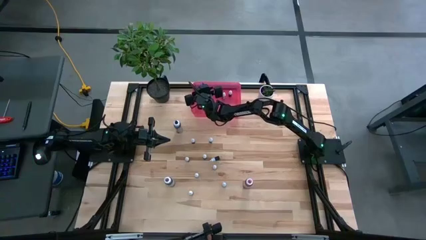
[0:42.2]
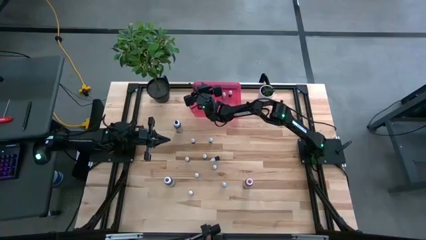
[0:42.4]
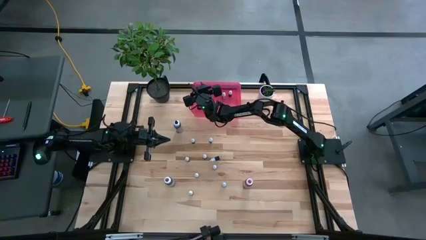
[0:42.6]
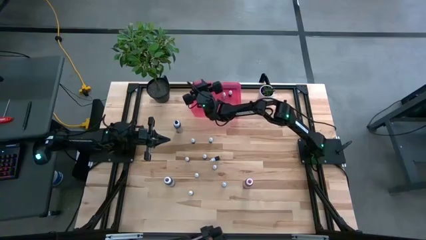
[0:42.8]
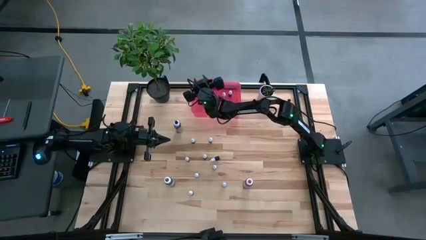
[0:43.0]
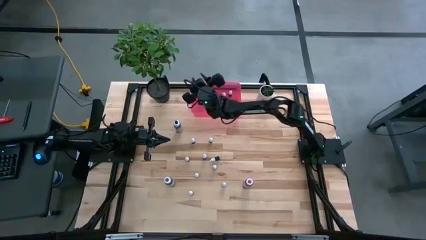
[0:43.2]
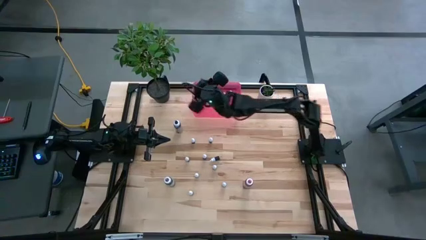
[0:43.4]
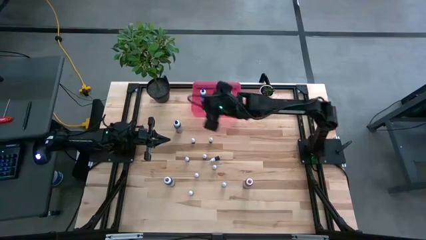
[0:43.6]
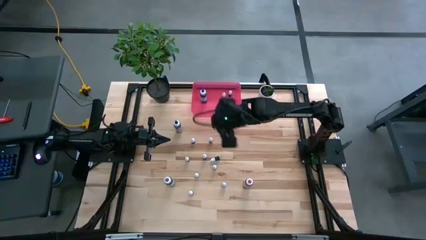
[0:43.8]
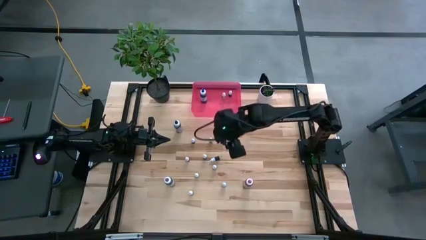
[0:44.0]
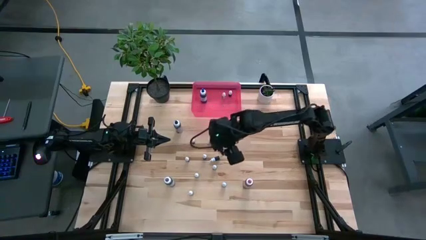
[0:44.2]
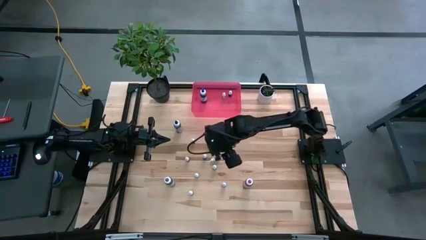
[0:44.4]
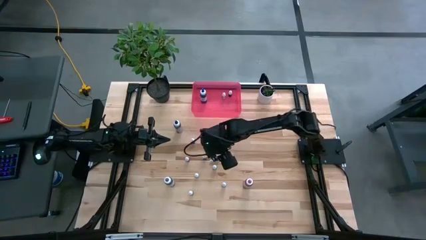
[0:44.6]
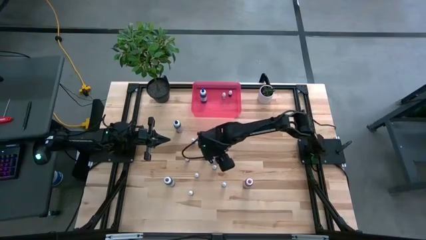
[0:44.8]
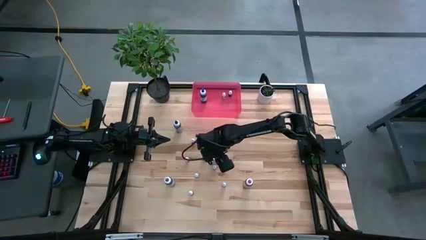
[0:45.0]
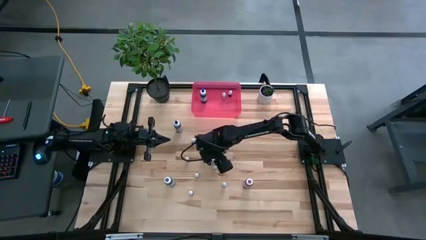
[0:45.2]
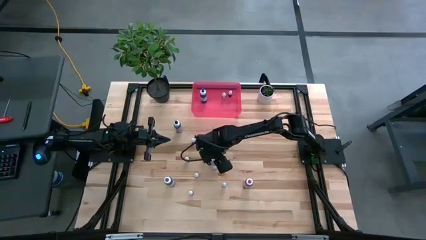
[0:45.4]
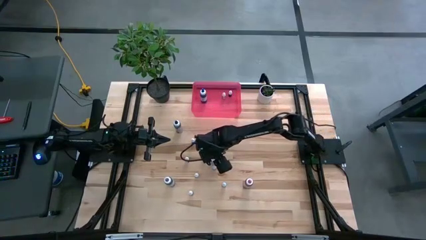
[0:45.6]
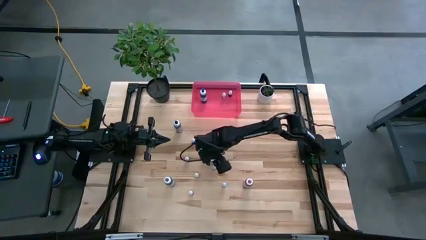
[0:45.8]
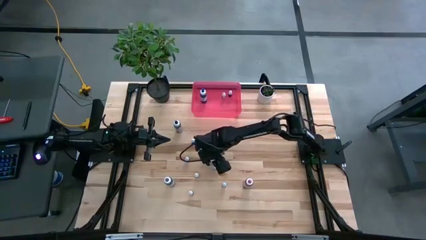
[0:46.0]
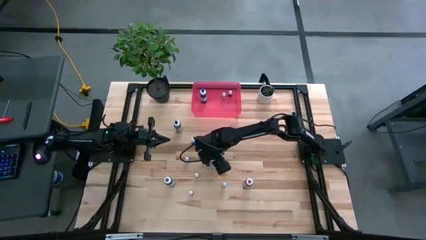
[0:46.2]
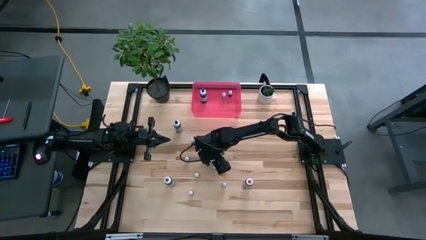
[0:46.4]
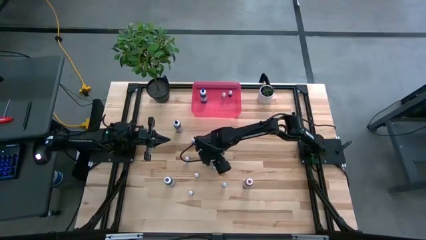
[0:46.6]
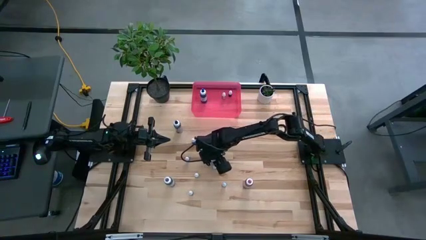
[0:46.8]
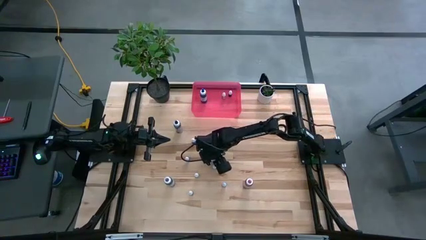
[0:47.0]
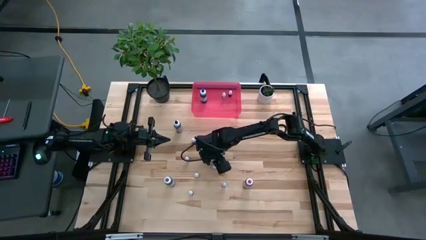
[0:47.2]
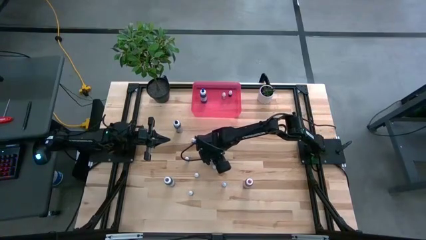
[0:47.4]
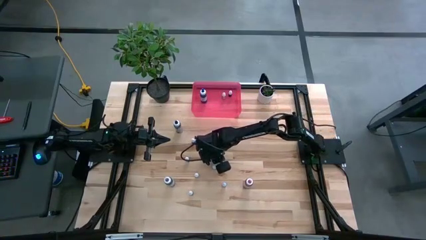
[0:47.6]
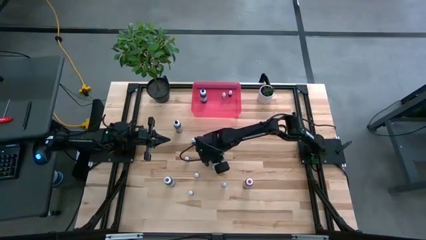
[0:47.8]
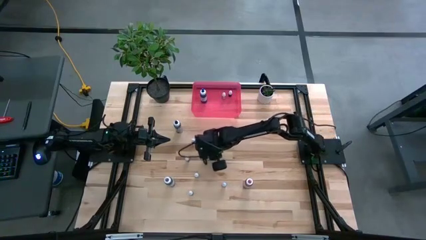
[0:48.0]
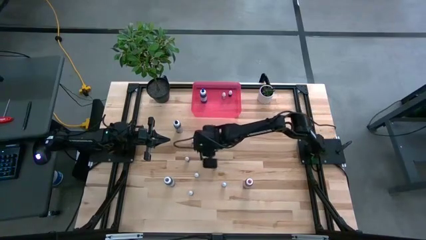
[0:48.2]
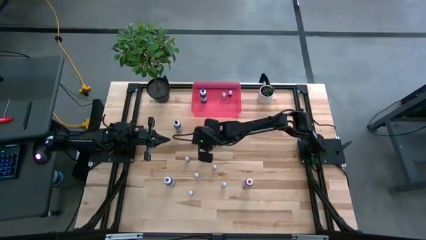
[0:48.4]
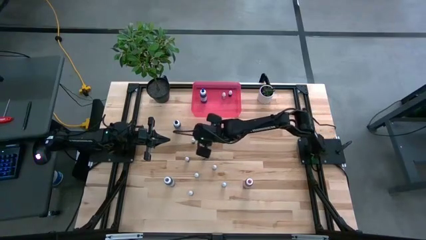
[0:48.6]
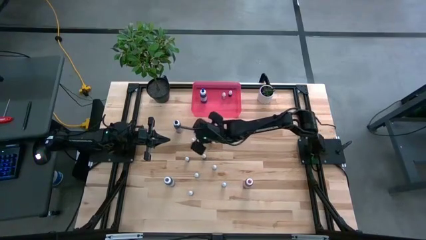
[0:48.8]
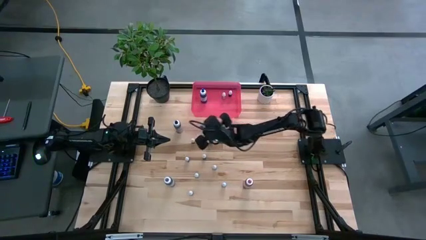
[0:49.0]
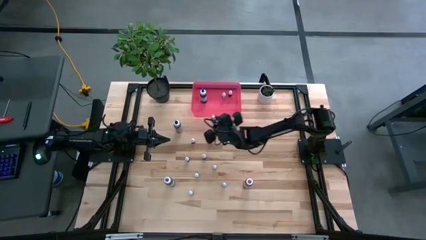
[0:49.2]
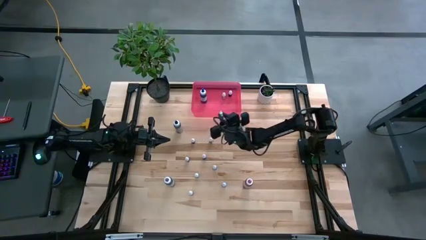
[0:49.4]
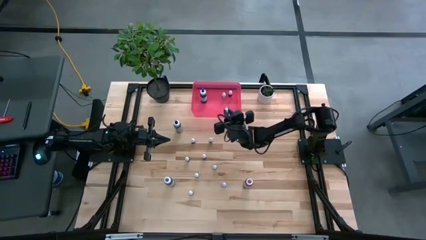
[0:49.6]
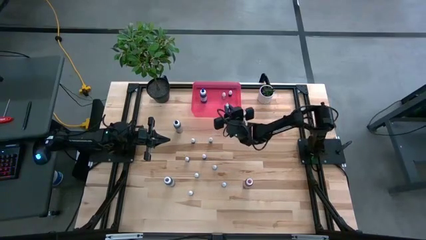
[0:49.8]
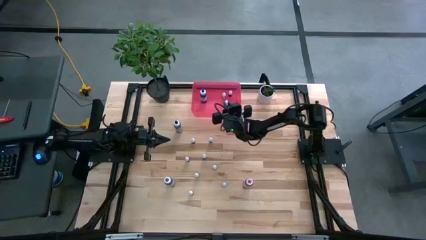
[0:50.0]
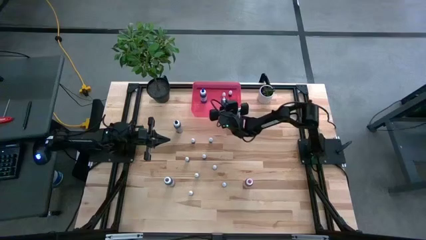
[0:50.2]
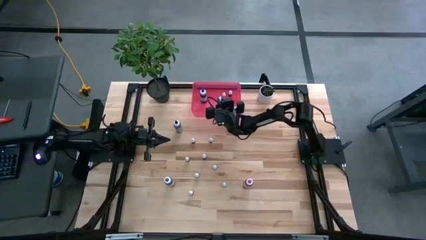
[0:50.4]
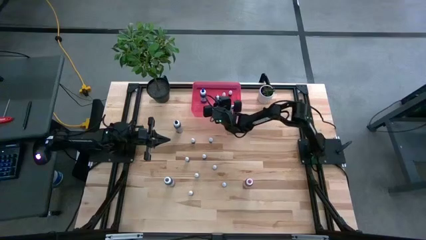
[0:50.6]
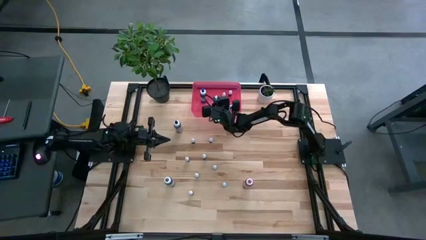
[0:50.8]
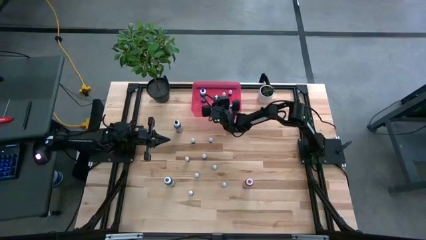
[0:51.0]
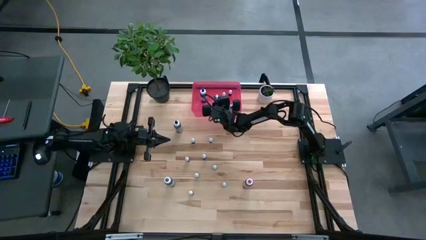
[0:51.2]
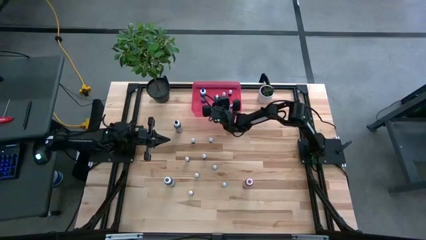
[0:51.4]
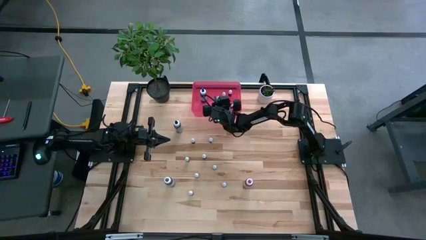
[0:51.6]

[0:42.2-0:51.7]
Task: Pick & Place food coloring
Put the small black food coloring bottle into the red bin

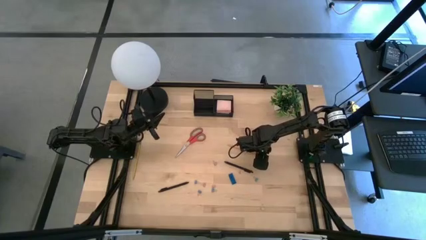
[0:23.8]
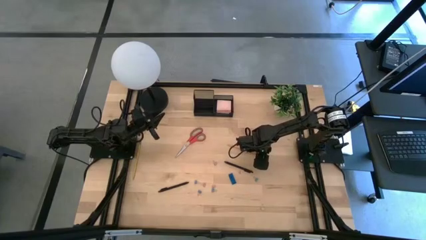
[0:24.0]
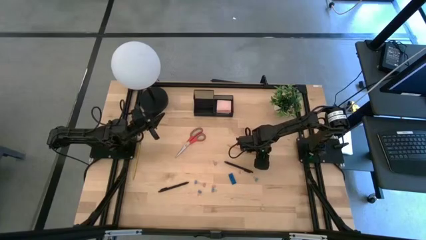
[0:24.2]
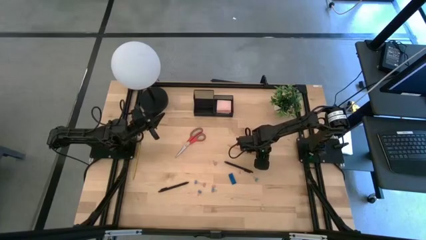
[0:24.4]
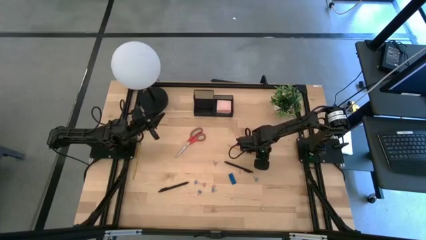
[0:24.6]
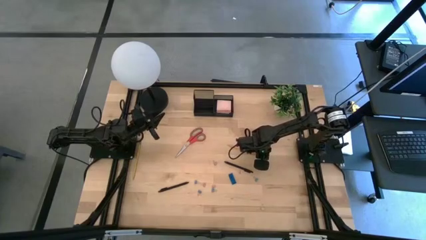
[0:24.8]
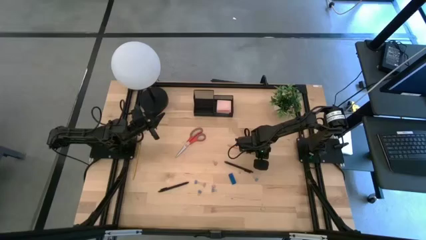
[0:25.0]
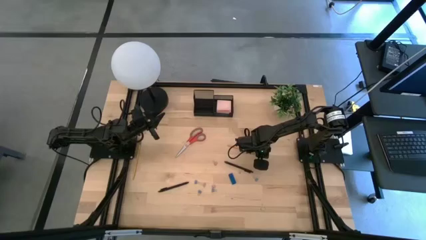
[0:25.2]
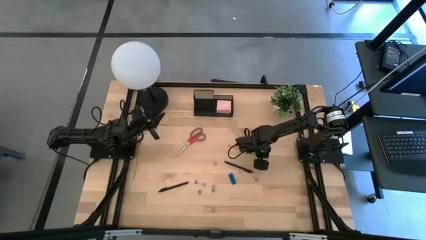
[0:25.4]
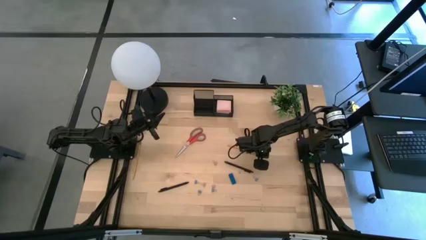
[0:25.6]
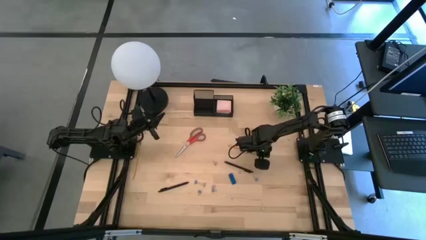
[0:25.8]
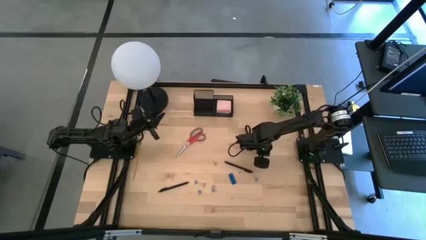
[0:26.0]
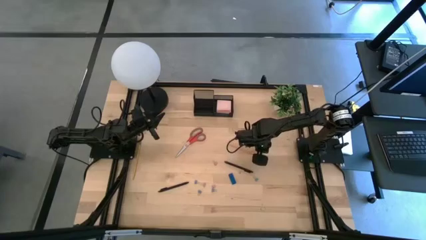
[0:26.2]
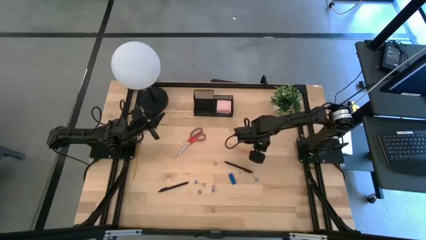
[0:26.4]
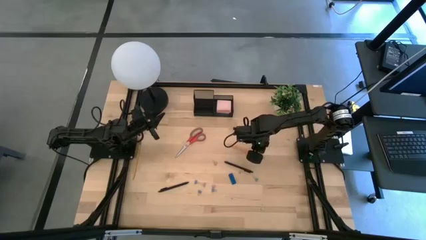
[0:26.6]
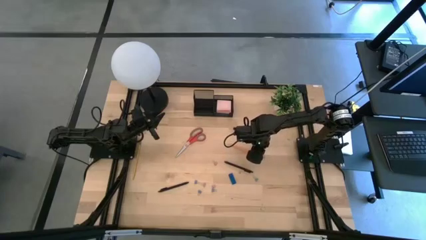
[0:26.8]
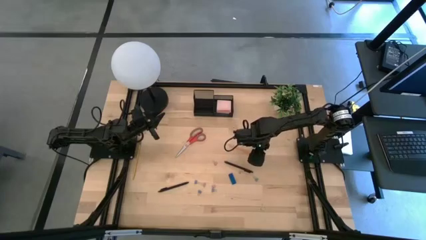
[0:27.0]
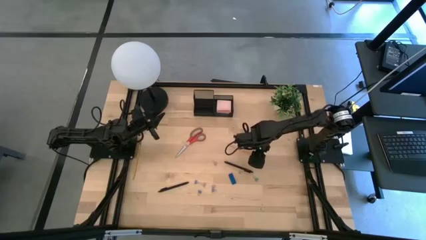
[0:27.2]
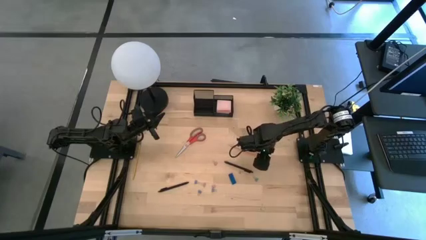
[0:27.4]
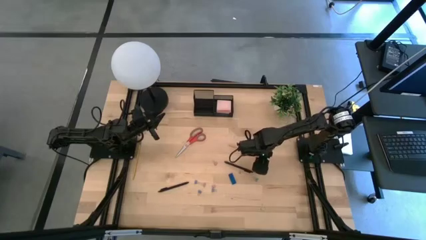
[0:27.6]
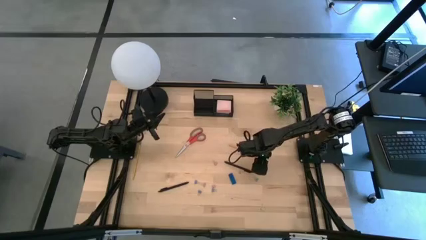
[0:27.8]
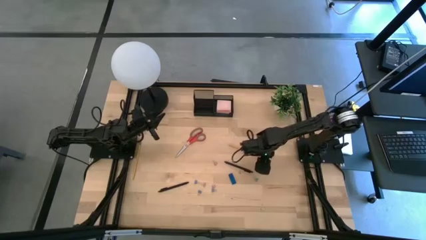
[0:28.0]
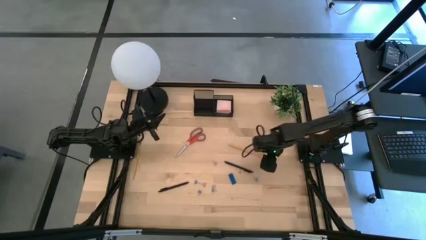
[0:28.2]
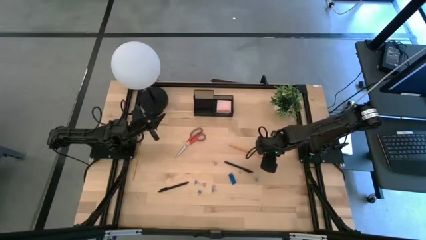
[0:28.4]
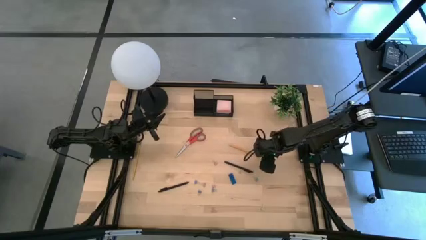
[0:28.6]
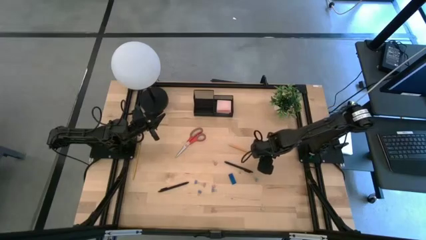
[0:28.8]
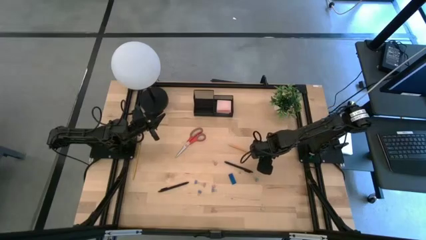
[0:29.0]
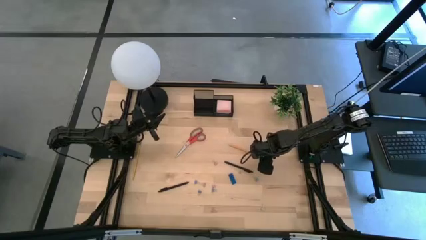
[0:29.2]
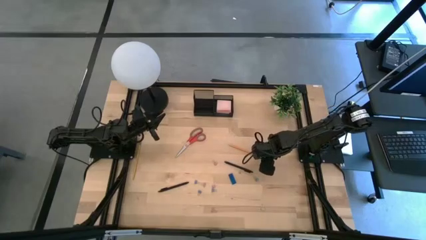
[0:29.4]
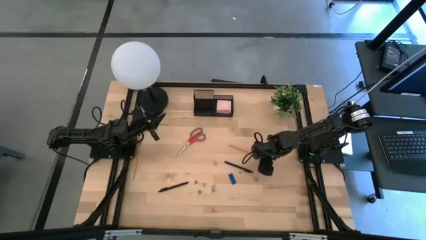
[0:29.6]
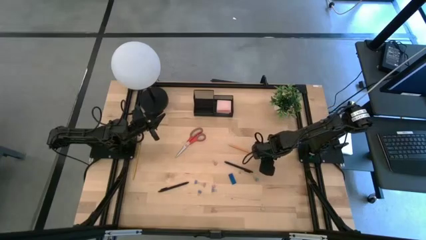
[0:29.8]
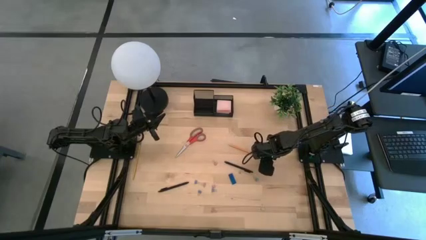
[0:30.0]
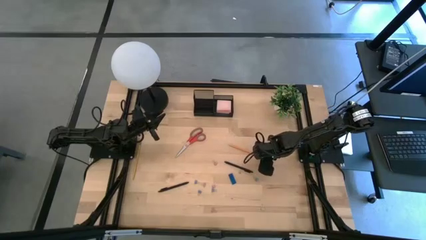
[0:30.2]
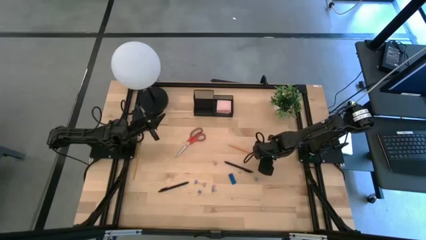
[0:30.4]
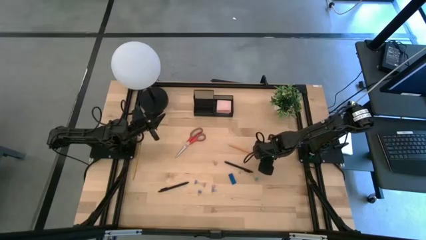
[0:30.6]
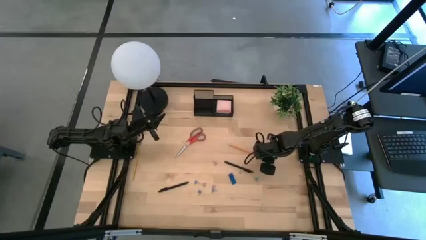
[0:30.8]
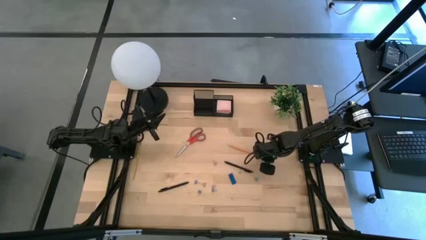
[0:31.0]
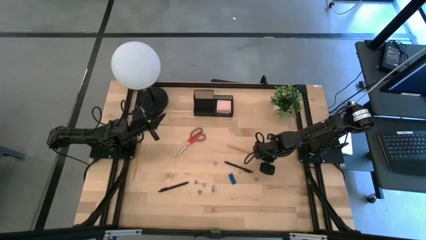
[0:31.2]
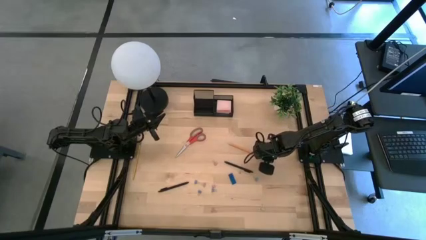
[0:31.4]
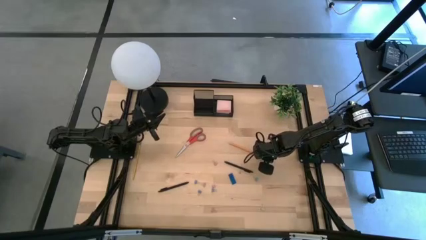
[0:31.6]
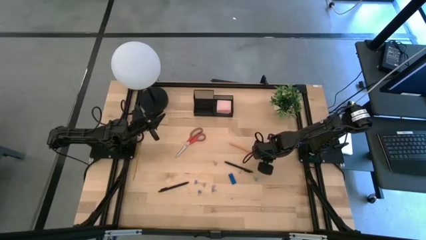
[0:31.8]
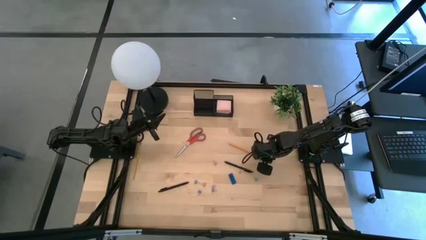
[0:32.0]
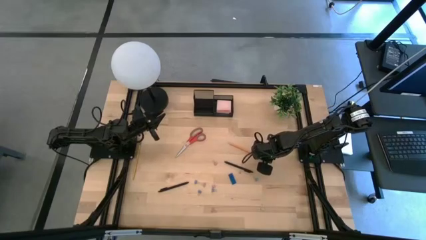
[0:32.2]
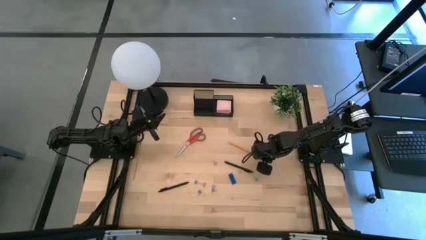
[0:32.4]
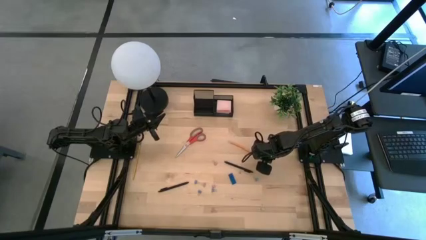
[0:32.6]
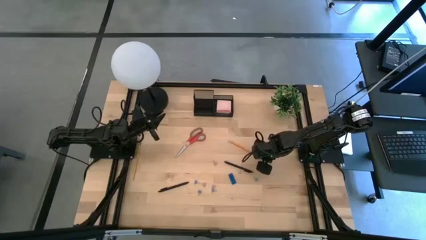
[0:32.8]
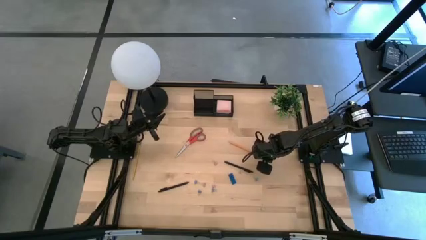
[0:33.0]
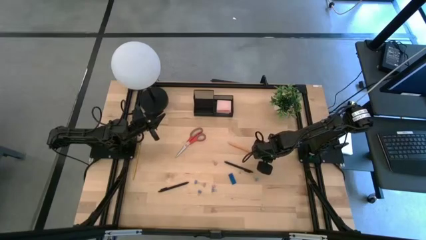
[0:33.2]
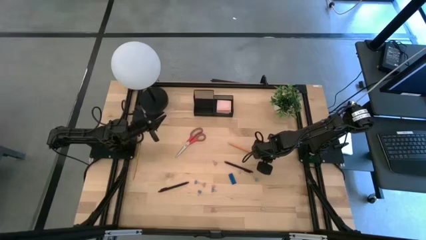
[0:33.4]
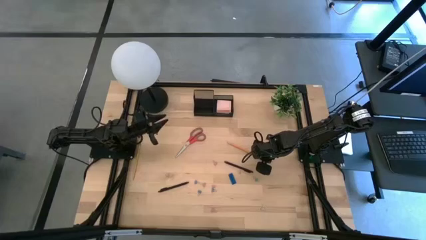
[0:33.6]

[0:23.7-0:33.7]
Task: Pick and place office supplies into organizer
Put the orange pencil into the black desk organizer
